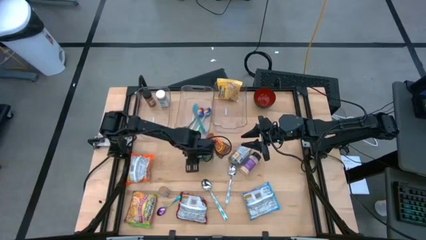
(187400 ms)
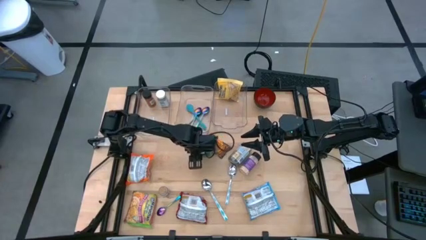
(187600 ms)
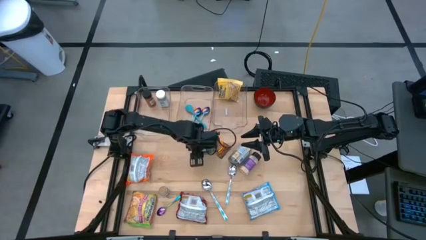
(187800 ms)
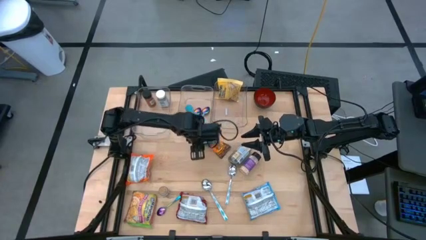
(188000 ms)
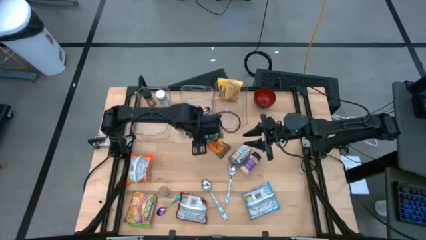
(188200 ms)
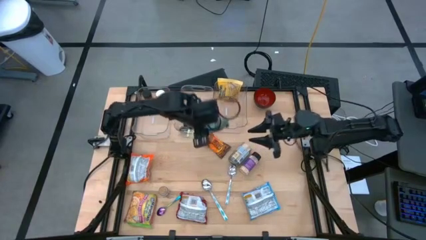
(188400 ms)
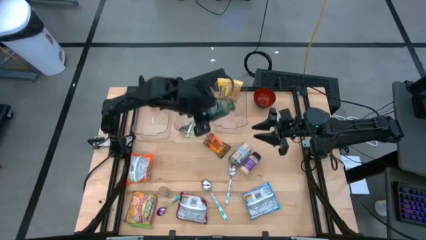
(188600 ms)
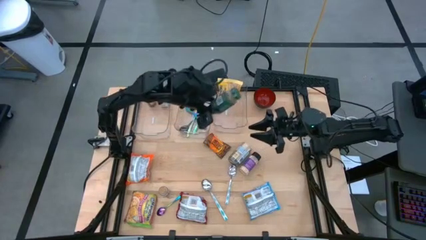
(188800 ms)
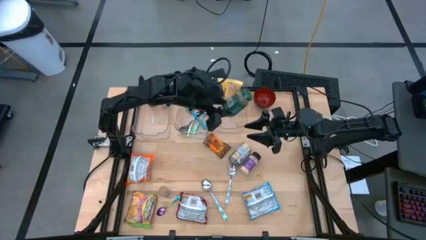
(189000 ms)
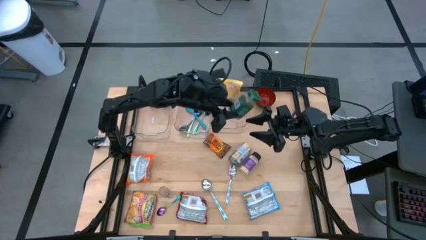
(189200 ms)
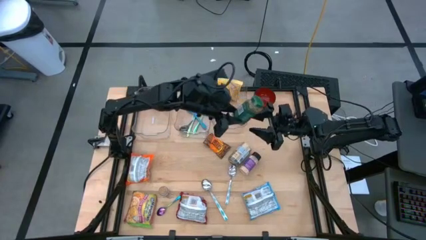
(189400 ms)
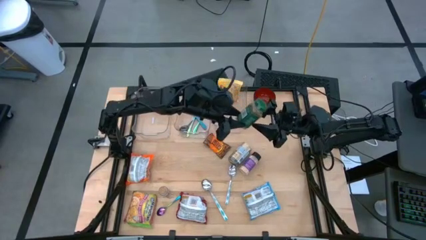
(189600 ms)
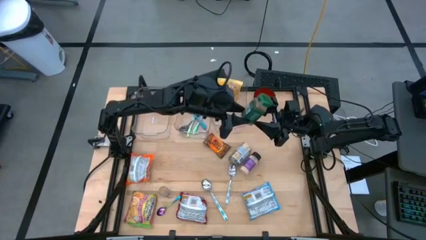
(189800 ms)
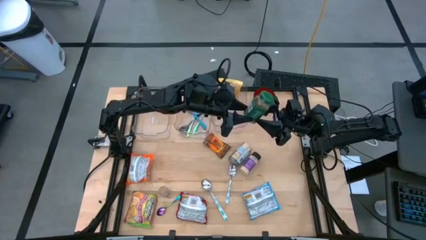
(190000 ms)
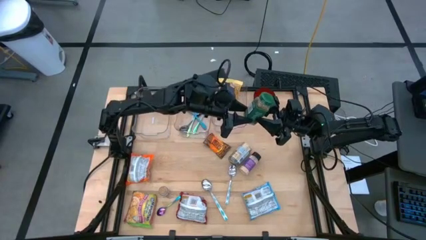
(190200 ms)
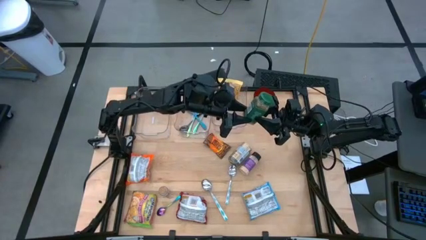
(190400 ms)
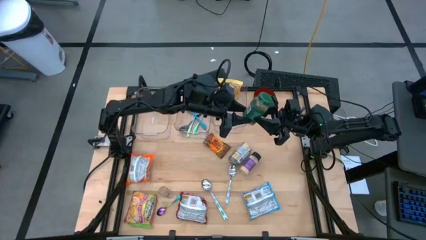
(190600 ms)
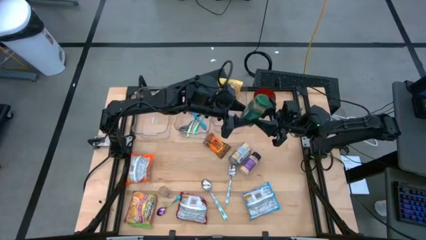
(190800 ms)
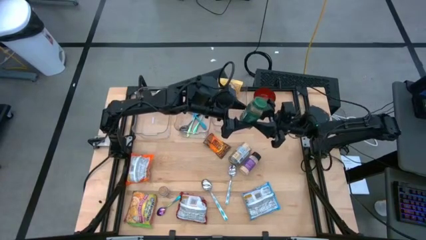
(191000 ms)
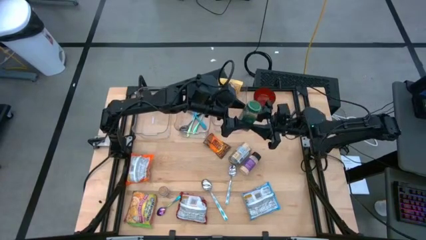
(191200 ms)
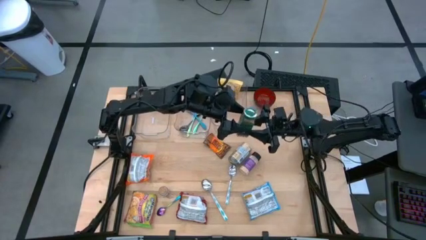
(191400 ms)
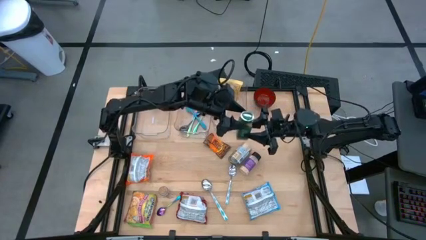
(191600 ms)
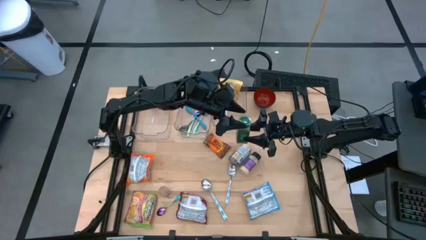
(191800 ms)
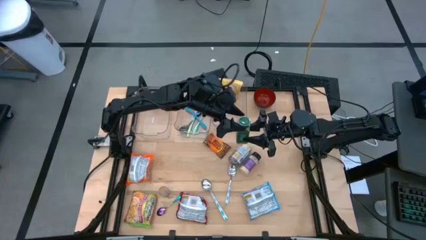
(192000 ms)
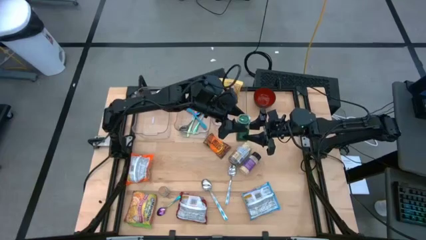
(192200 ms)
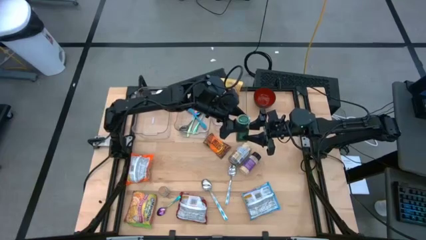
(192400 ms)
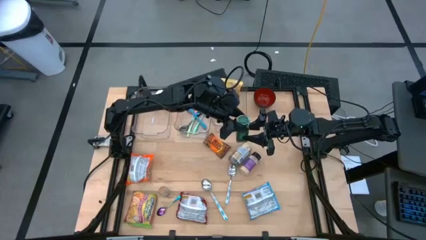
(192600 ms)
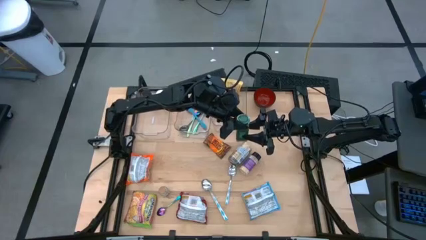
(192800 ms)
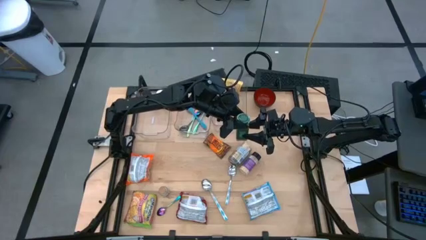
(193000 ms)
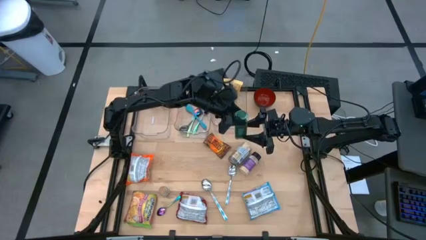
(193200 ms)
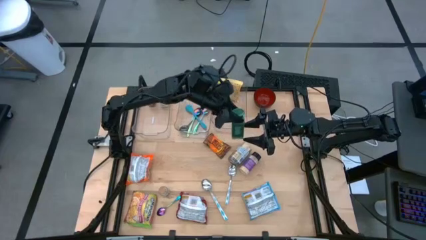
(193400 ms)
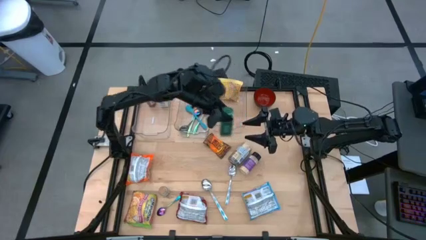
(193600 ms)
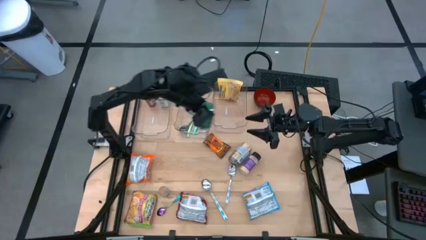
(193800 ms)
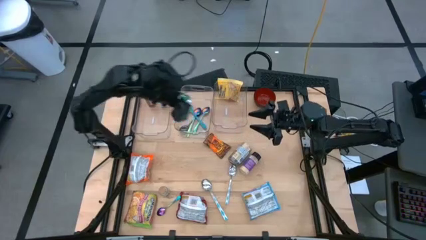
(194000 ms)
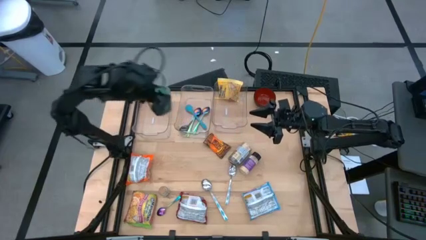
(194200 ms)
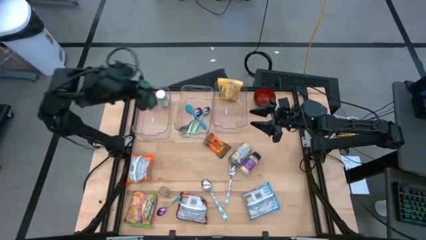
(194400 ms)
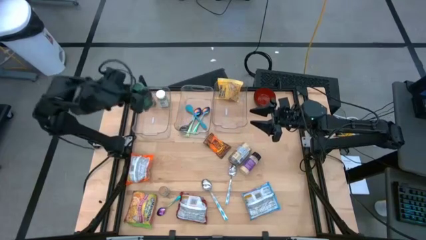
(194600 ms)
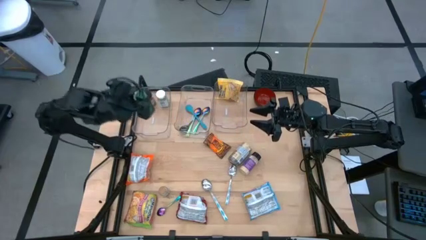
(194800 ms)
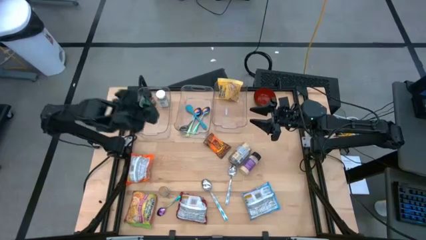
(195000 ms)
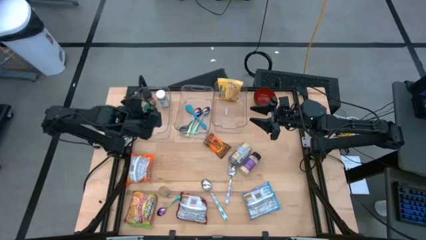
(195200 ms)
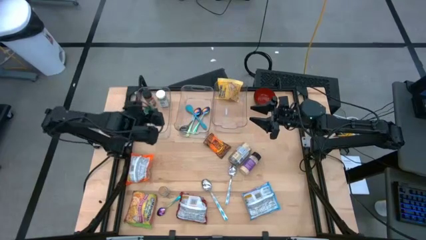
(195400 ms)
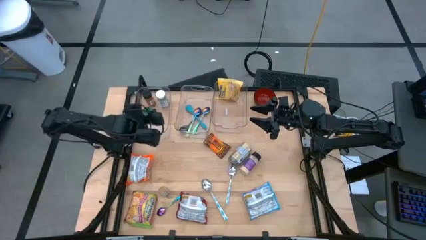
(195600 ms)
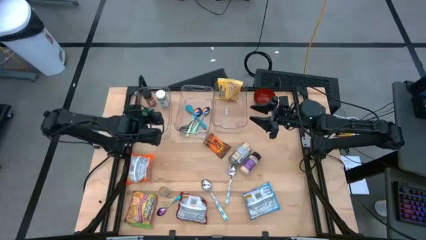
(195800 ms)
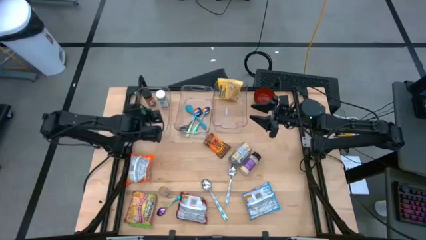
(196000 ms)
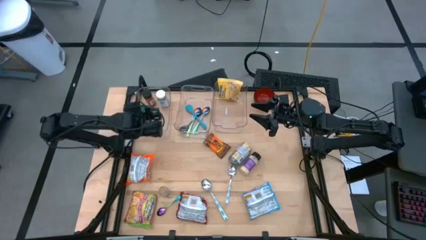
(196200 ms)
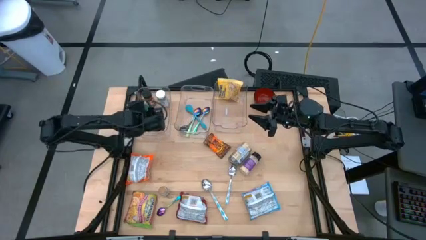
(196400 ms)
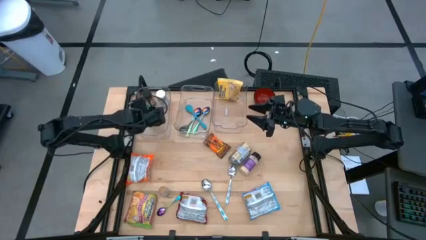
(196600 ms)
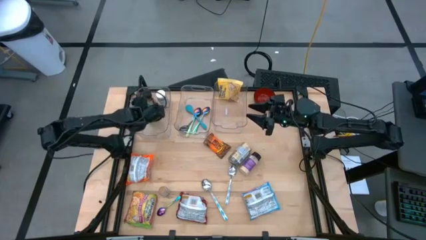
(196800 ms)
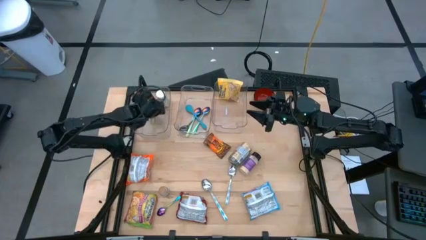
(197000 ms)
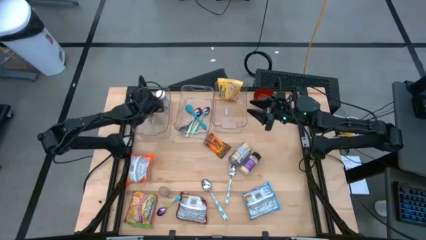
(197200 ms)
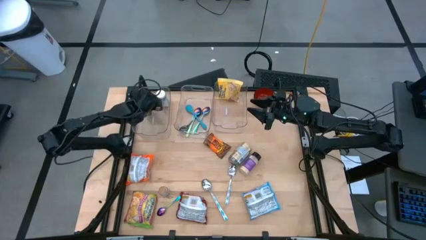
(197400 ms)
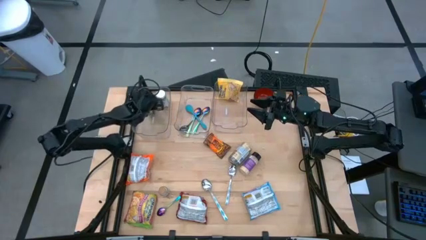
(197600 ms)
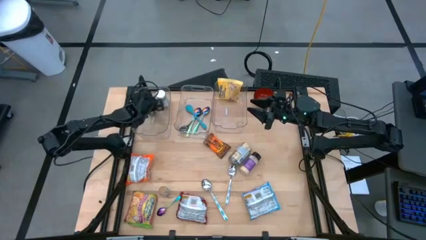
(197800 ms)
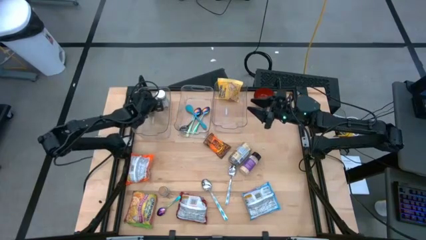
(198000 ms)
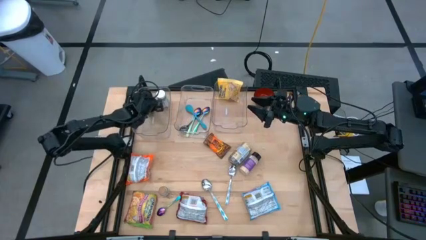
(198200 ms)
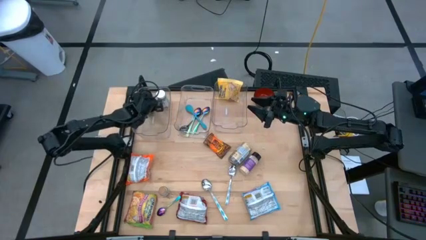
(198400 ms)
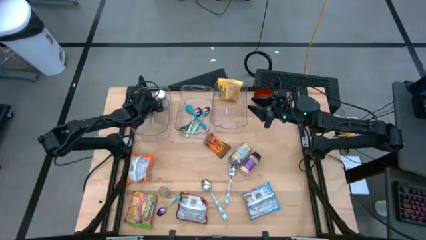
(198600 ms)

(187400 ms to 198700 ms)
Task: Pick & Place Food Item
Put the green spice bottle into the left transparent bin

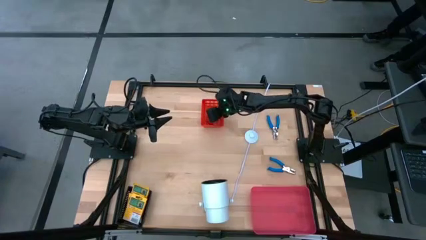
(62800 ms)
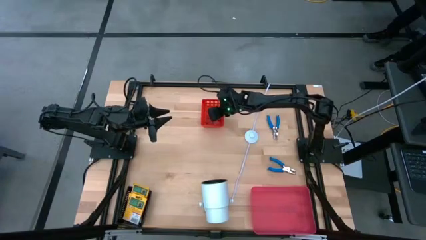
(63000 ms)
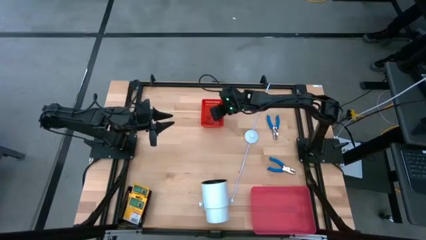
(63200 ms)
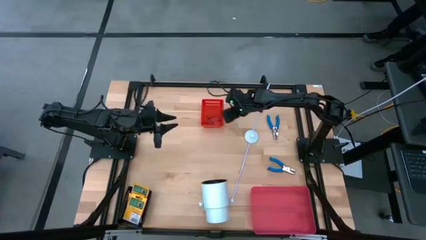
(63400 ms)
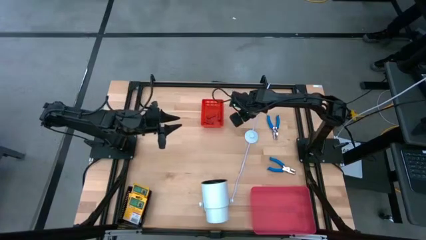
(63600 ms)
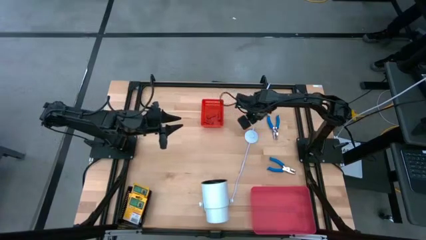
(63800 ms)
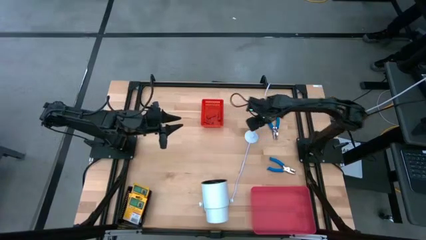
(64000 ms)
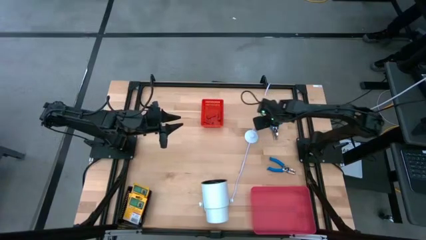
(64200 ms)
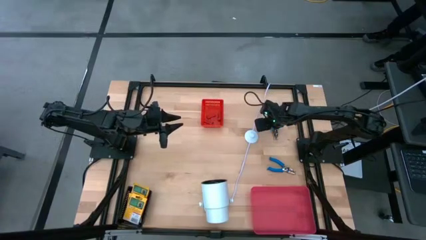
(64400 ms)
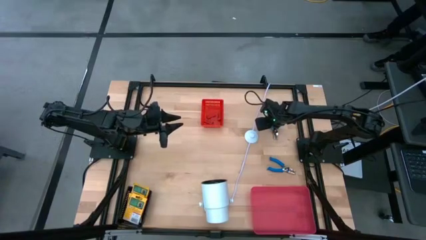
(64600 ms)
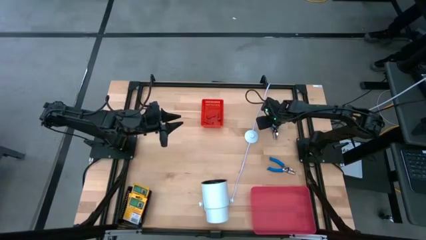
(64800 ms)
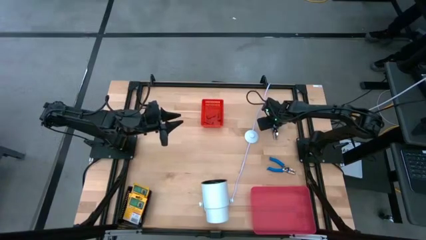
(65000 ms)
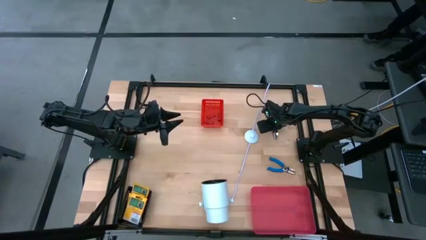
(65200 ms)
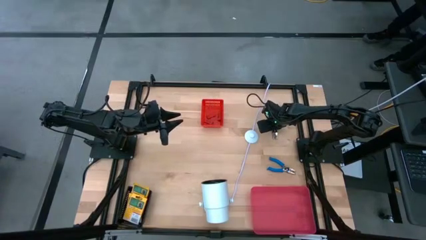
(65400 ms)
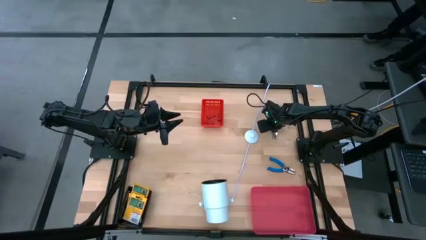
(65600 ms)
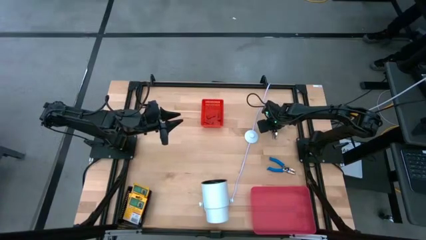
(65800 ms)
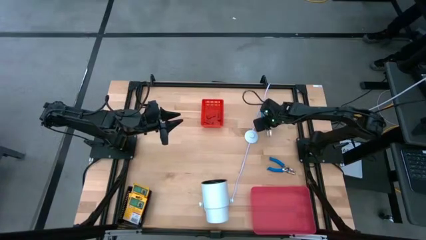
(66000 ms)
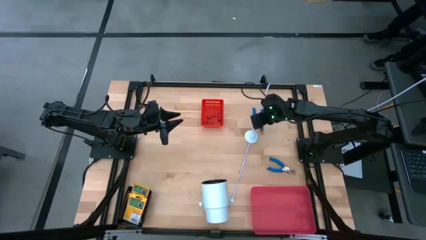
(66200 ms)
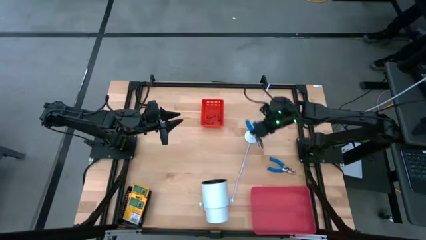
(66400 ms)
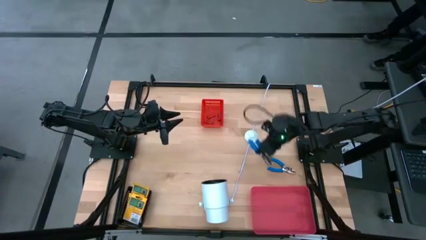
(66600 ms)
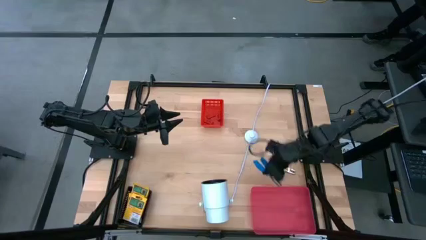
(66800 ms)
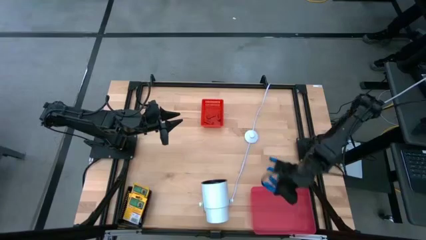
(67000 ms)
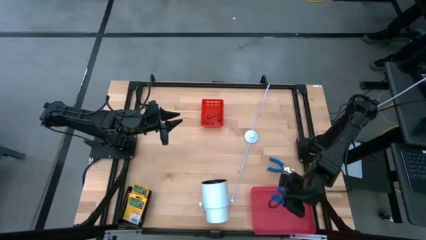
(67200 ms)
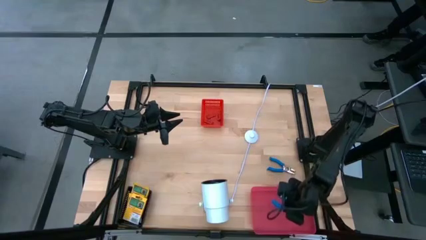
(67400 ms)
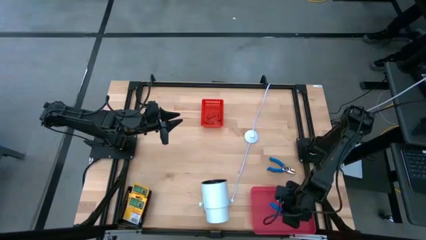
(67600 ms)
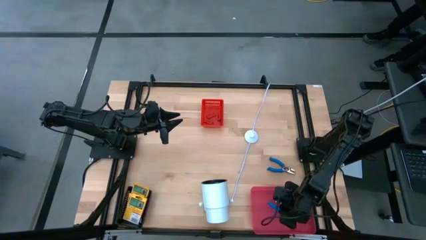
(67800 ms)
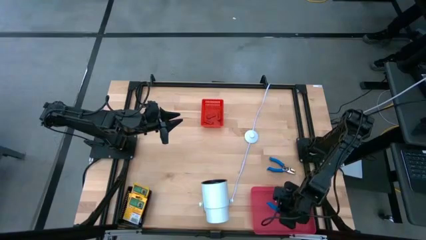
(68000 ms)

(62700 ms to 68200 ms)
Task: Pick & Place School Supplies
Put the blue hole puncher into the pink bin
